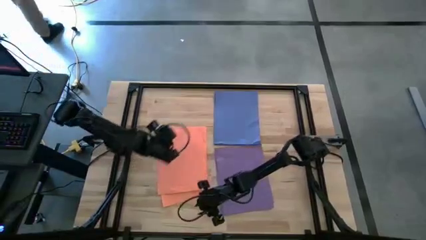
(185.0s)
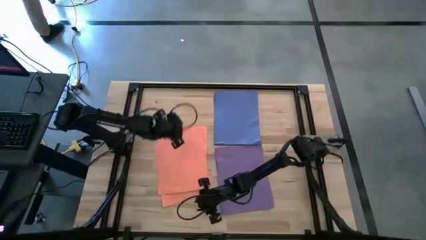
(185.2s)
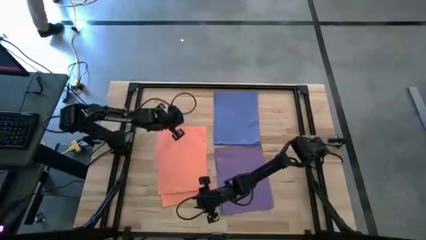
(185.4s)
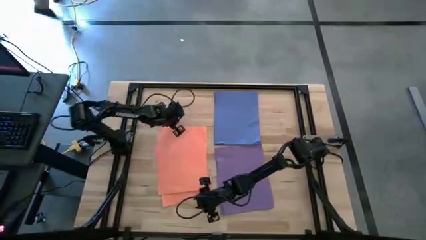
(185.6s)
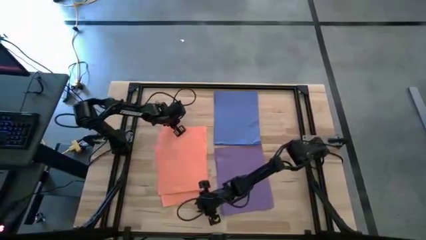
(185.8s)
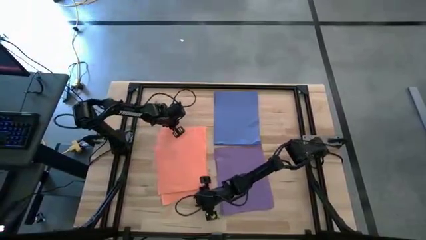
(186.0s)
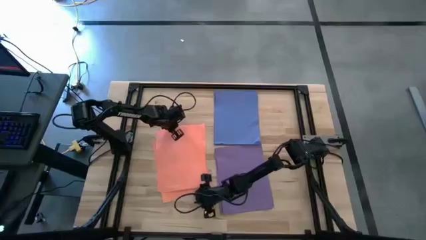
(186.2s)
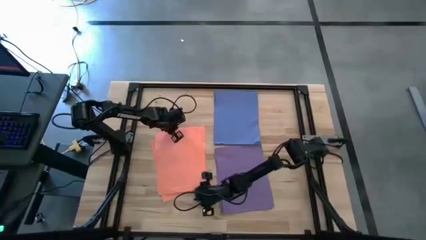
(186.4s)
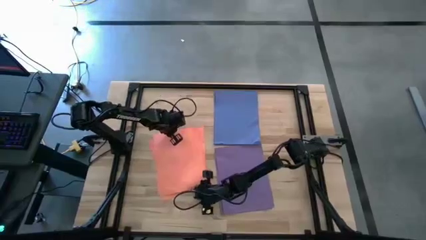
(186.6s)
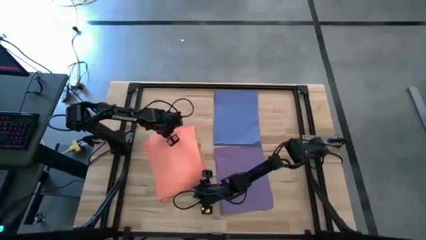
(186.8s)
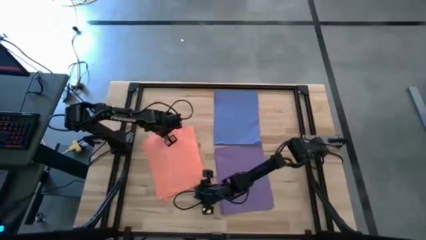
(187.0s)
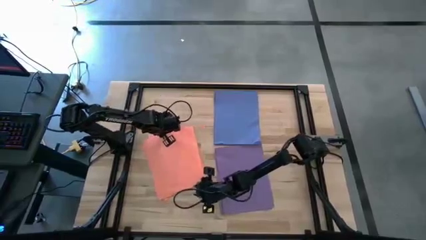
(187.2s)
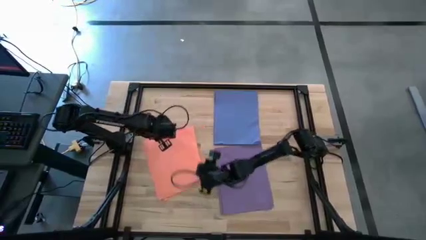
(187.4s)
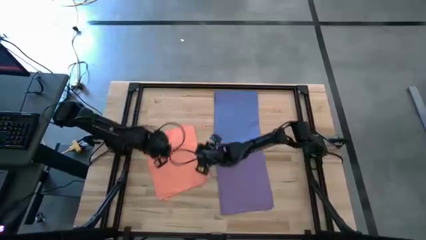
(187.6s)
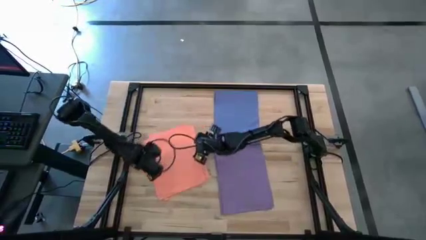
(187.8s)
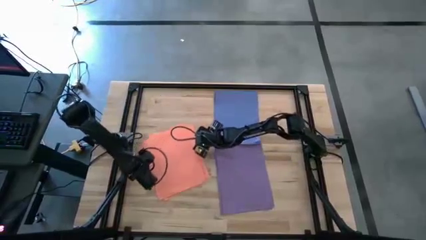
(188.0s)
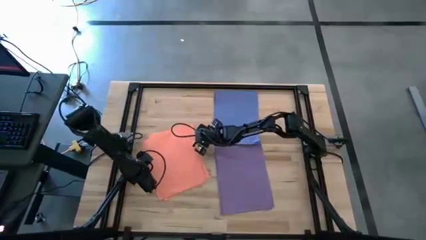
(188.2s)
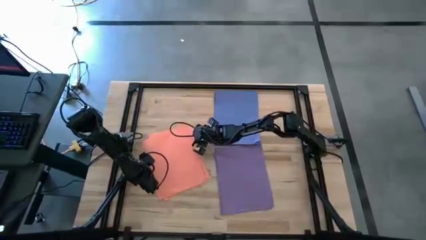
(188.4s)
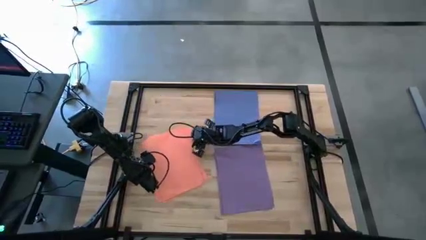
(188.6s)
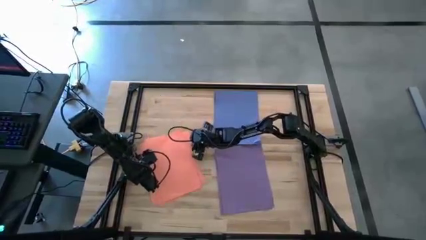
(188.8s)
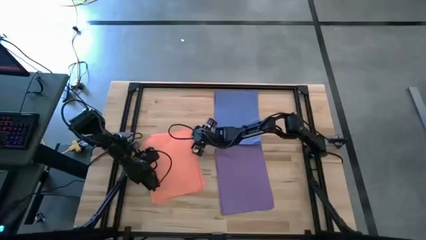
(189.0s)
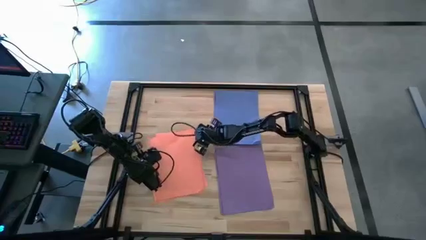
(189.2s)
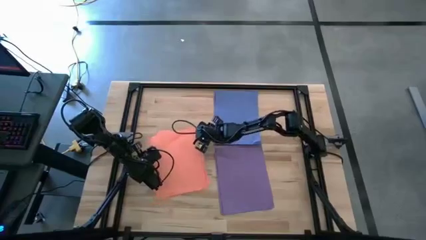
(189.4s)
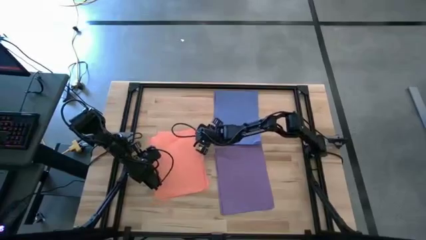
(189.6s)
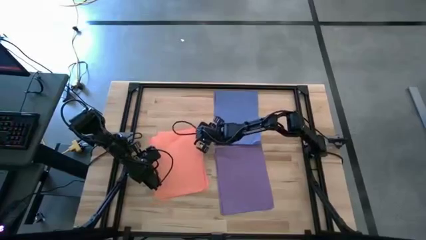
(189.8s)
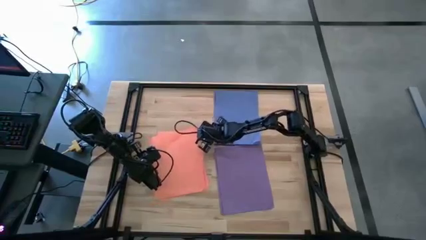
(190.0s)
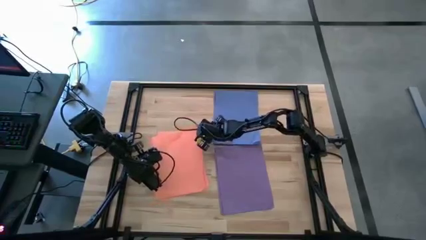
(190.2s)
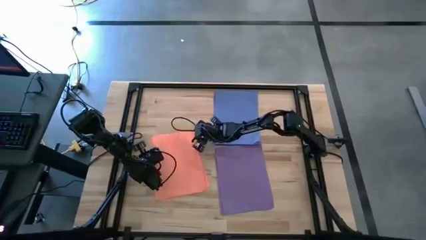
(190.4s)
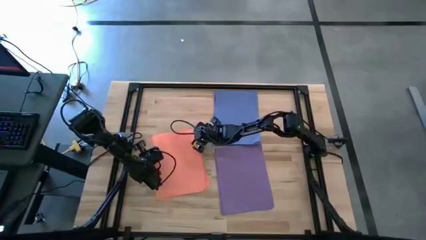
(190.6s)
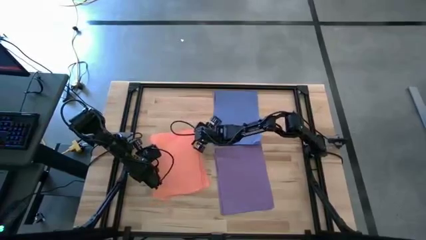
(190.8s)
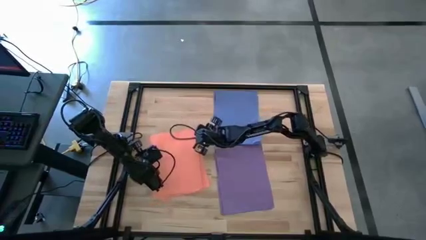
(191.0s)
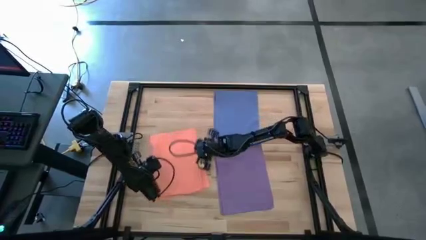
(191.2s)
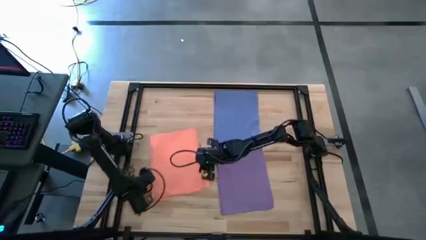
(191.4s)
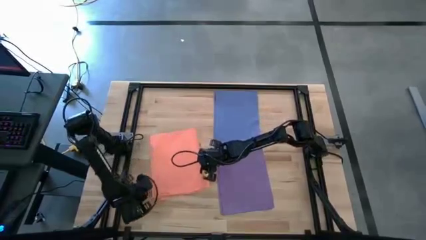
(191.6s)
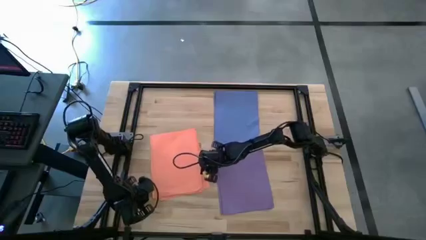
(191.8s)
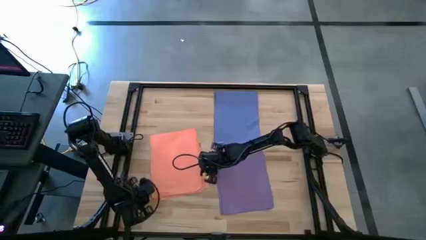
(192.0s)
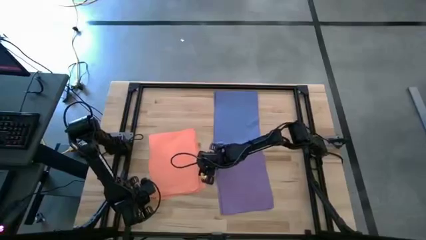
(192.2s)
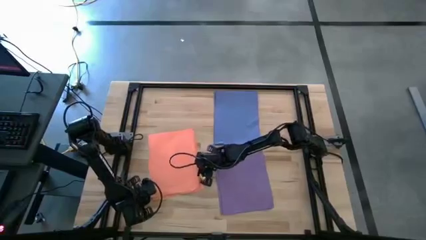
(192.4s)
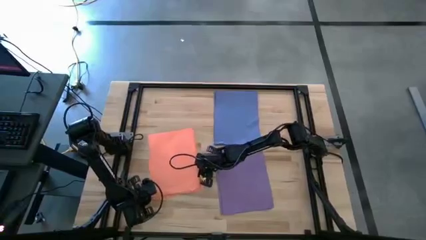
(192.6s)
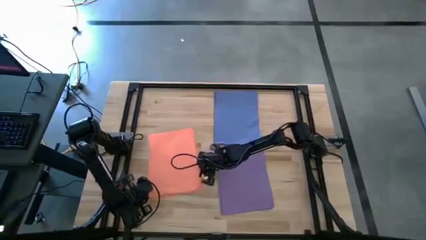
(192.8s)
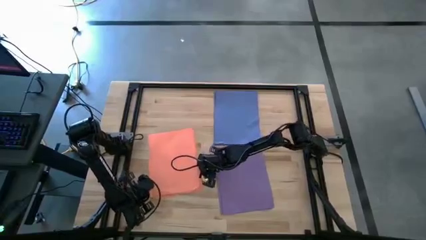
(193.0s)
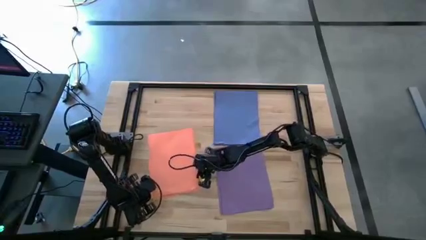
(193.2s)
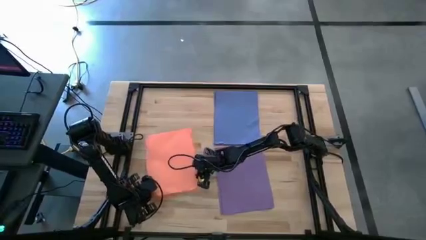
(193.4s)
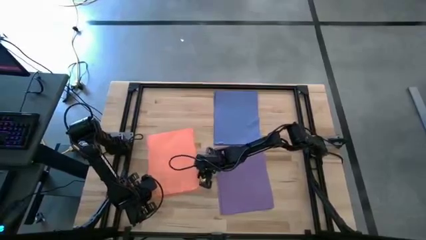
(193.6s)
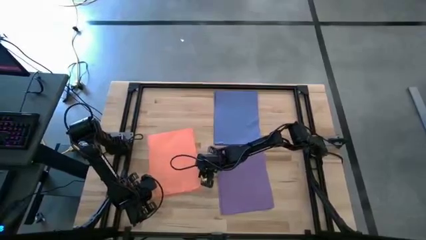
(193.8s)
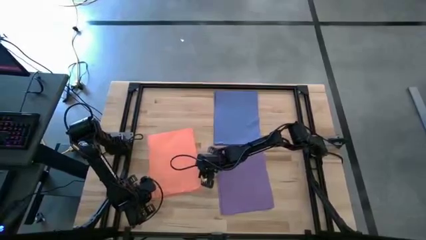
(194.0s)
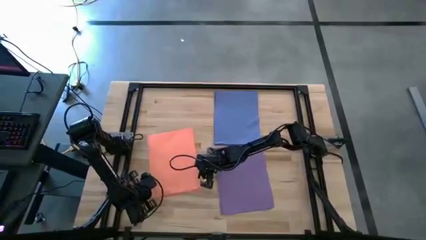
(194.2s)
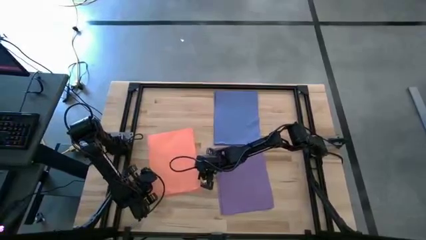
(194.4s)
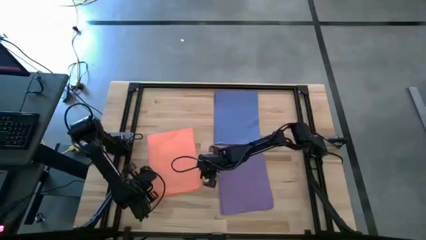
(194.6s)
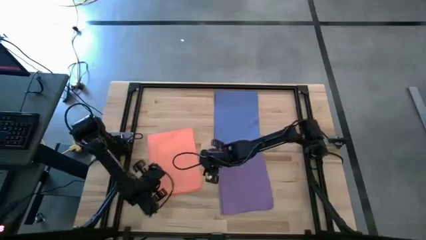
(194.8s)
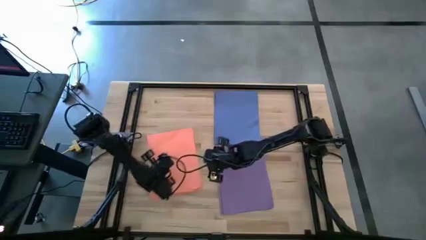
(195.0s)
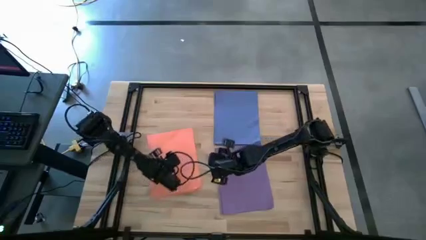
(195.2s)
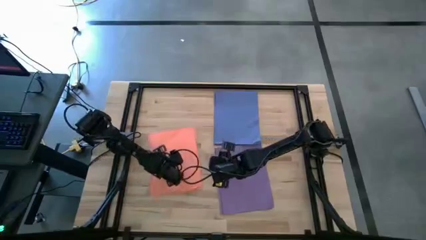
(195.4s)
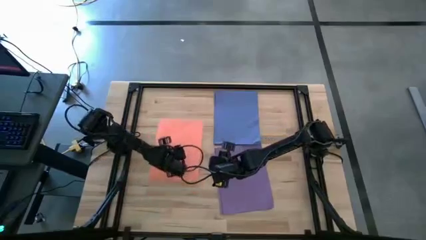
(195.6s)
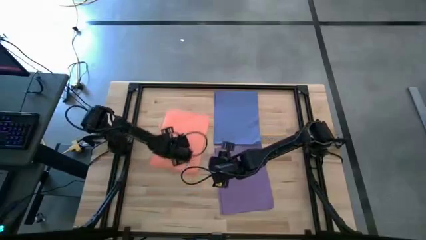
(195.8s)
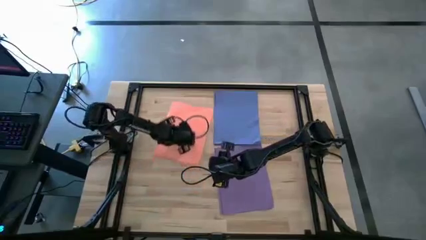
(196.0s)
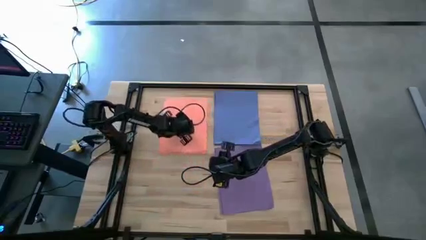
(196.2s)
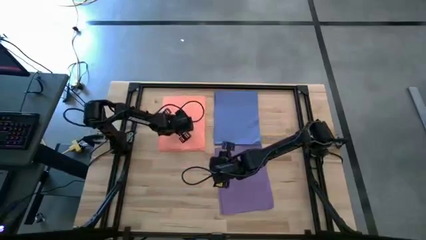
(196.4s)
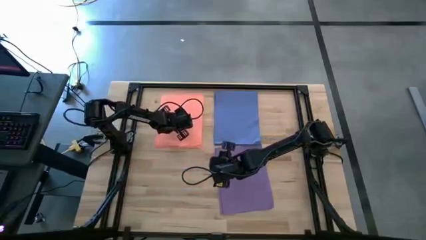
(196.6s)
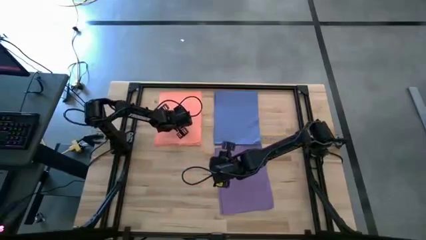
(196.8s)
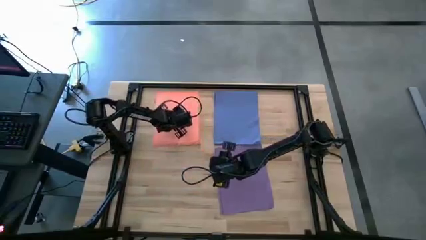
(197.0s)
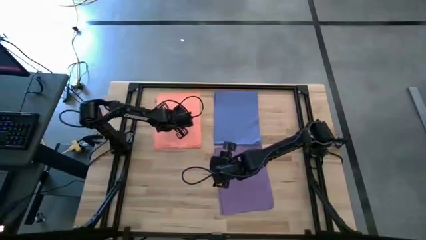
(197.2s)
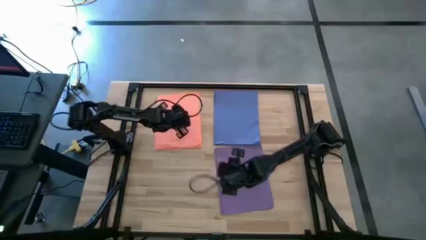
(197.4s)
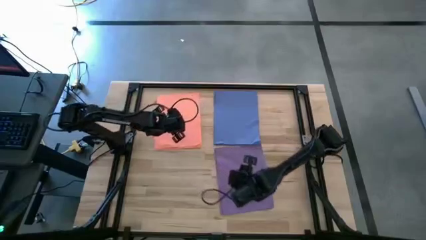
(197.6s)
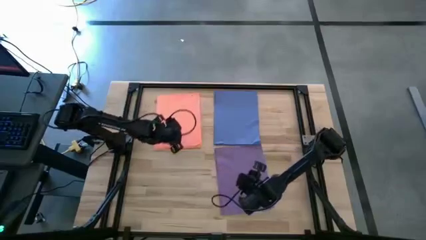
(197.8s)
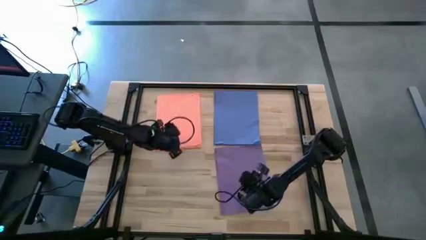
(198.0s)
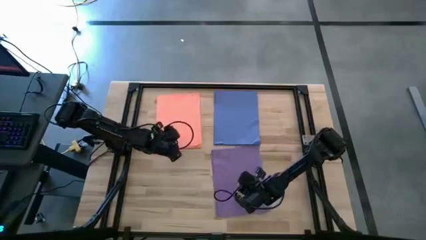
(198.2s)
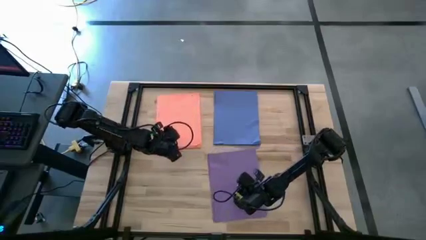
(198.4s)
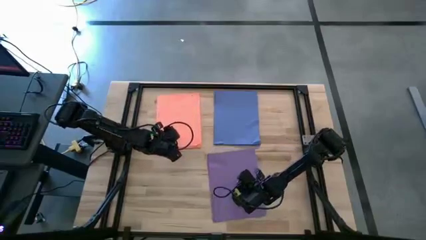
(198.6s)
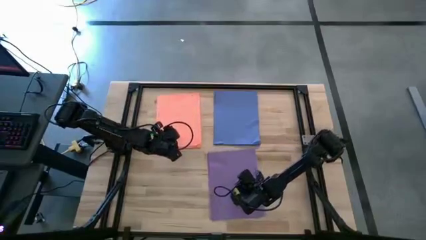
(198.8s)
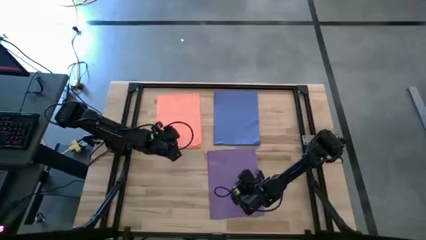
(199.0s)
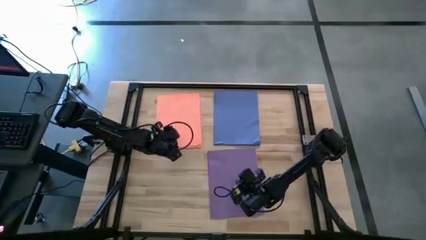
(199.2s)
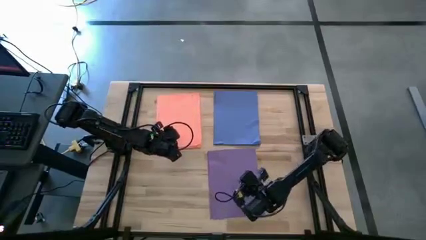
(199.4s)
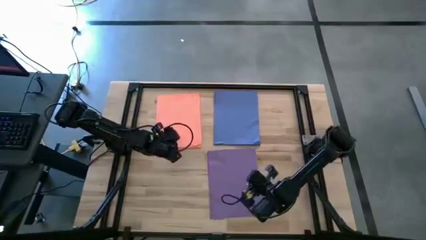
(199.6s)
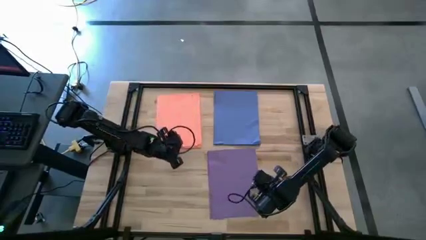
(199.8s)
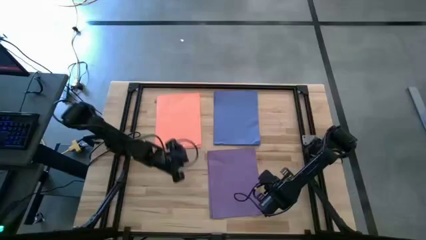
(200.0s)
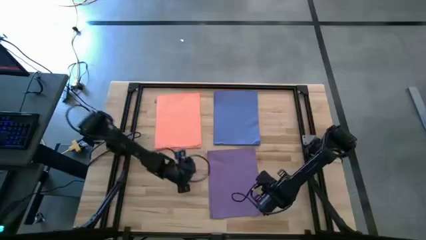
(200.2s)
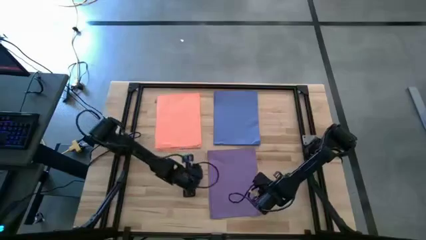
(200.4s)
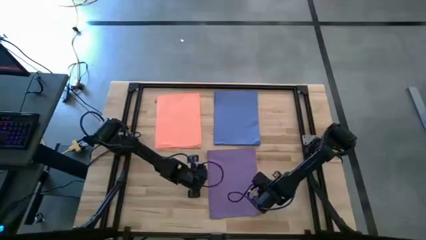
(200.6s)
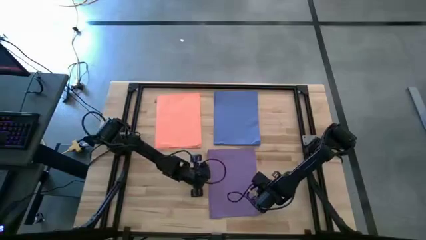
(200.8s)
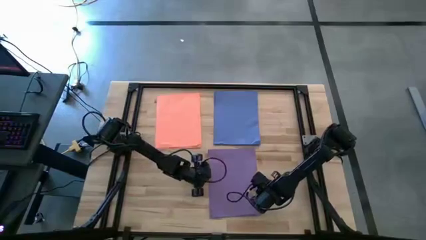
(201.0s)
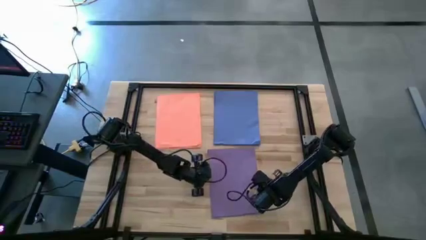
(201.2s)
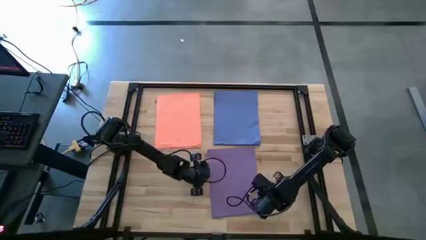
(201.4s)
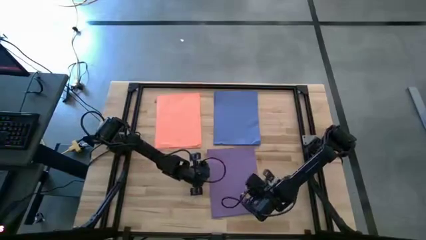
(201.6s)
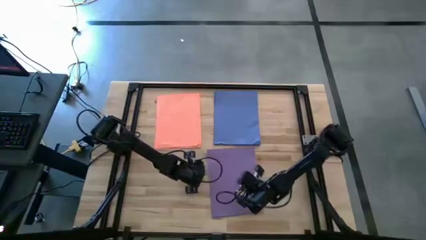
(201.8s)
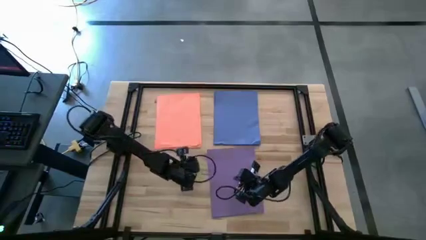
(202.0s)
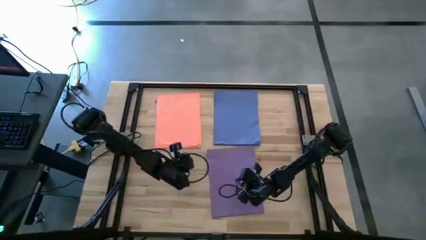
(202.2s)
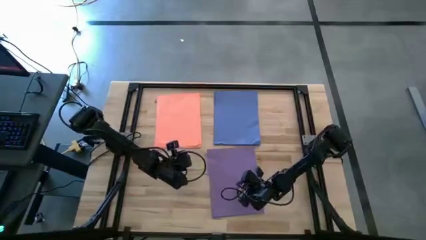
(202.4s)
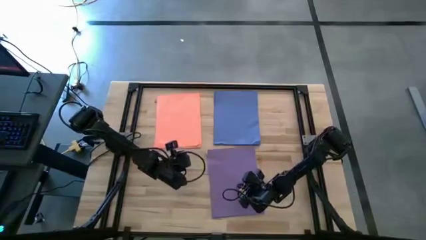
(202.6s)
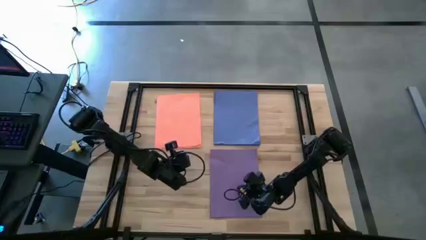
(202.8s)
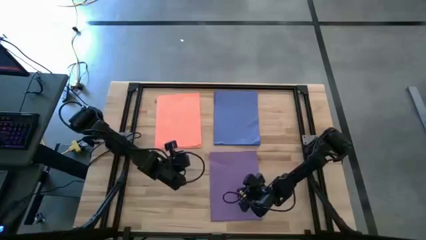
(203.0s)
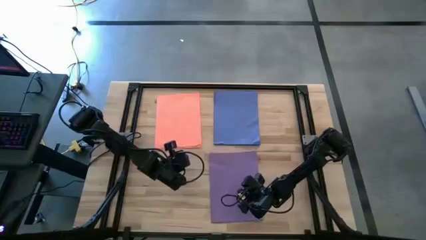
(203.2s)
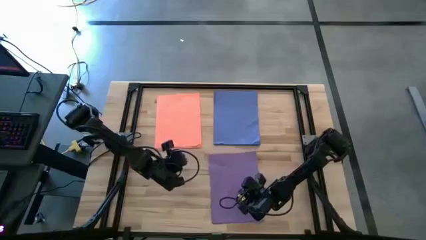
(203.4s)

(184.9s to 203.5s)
Task: Organize paper
Adjust the stacked colored papers on the table
